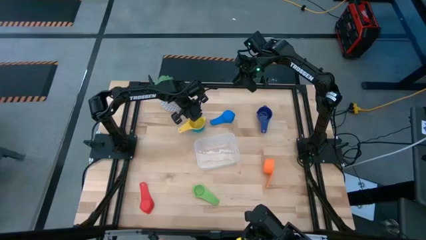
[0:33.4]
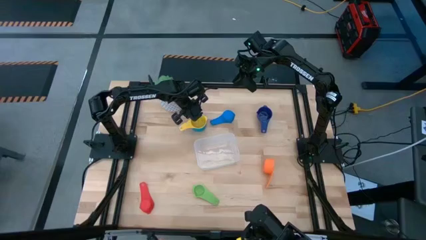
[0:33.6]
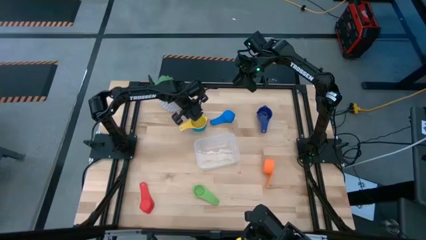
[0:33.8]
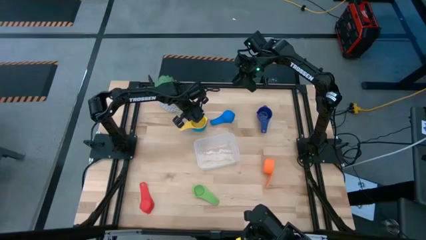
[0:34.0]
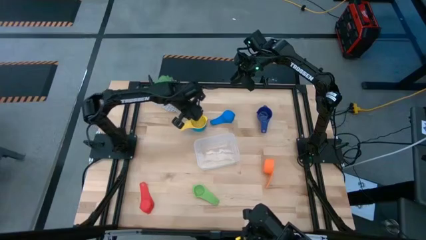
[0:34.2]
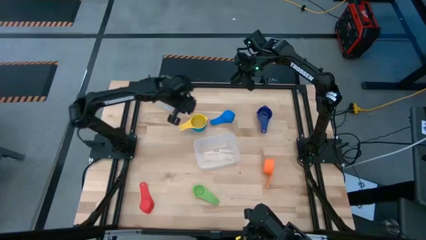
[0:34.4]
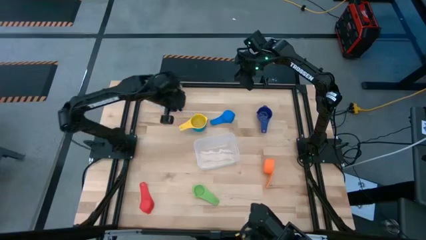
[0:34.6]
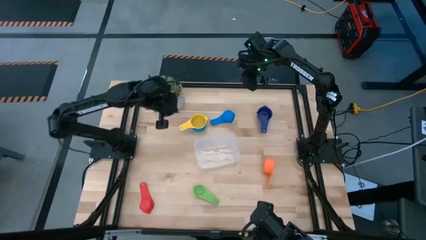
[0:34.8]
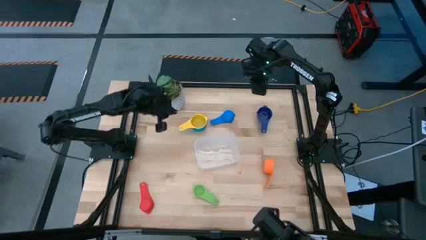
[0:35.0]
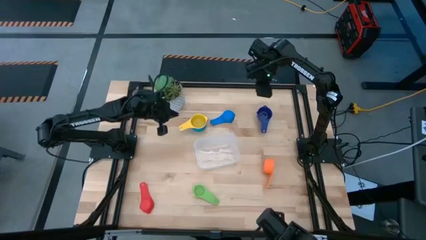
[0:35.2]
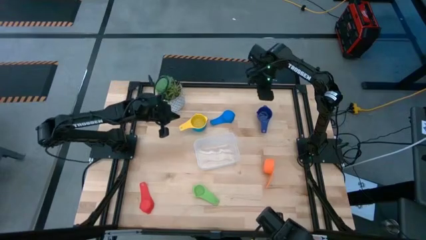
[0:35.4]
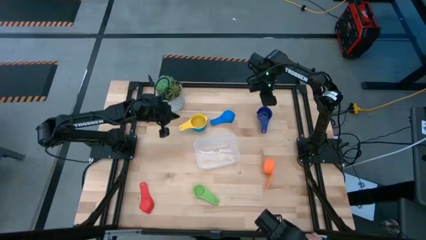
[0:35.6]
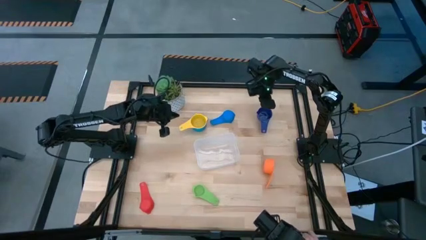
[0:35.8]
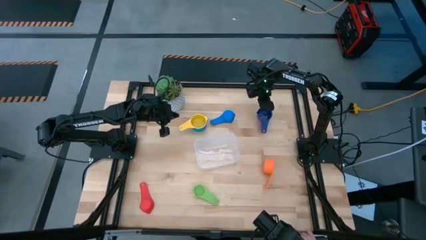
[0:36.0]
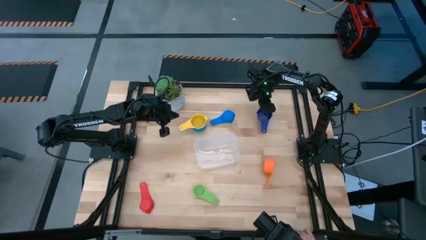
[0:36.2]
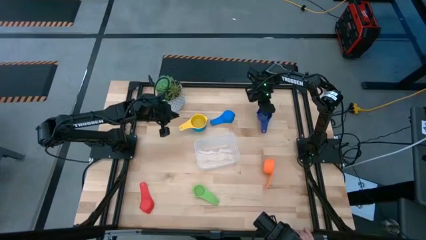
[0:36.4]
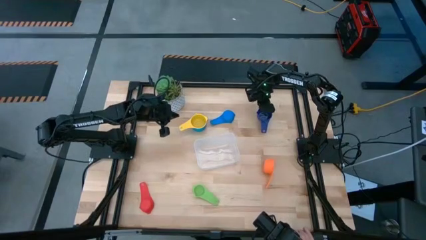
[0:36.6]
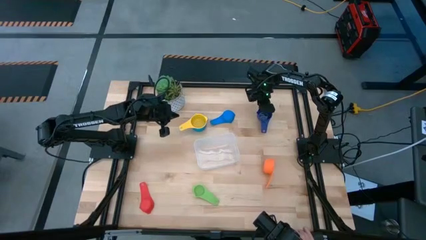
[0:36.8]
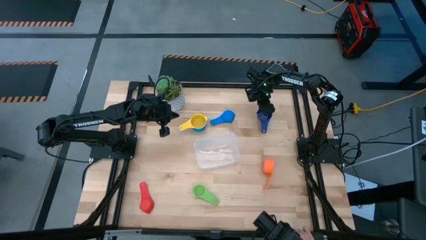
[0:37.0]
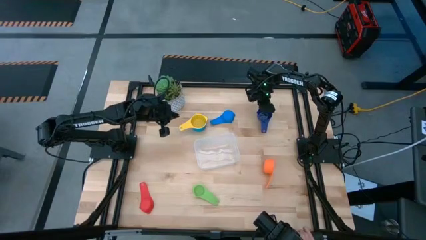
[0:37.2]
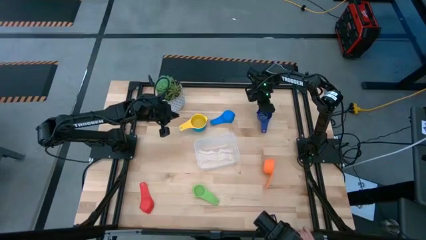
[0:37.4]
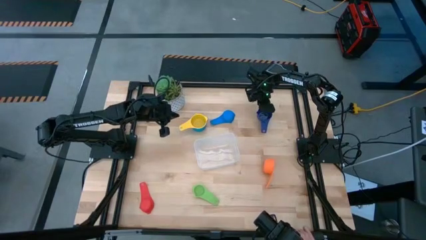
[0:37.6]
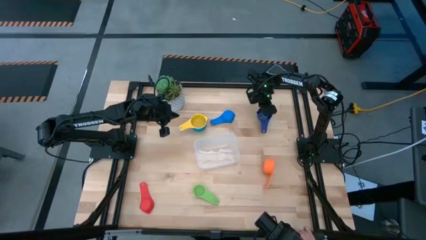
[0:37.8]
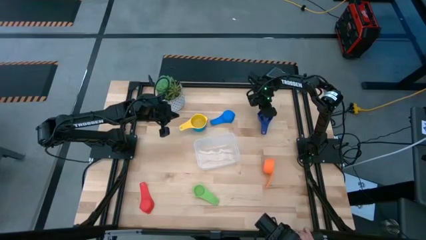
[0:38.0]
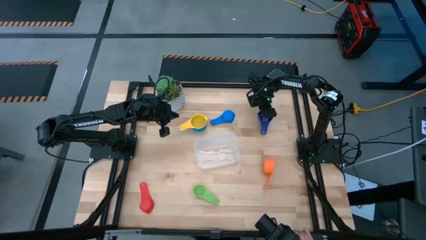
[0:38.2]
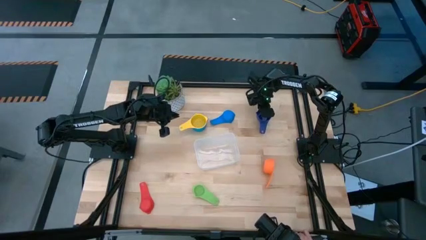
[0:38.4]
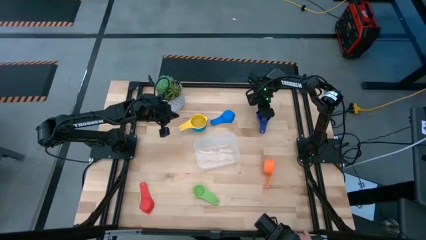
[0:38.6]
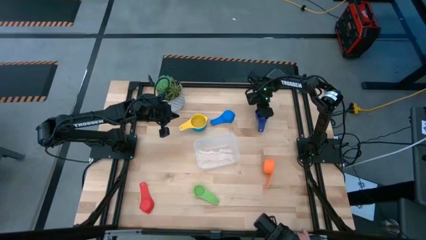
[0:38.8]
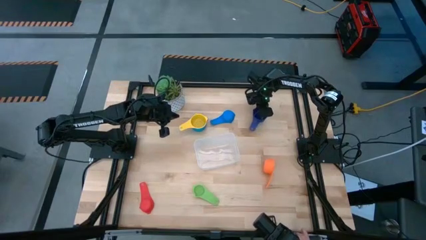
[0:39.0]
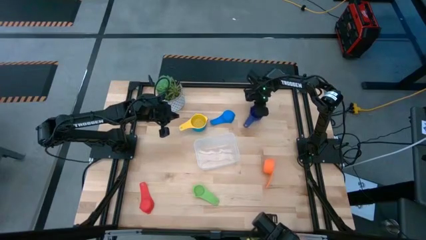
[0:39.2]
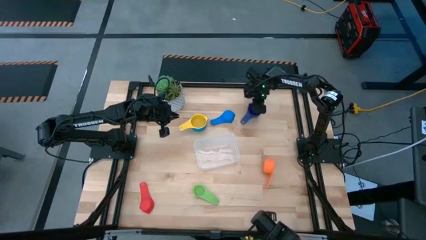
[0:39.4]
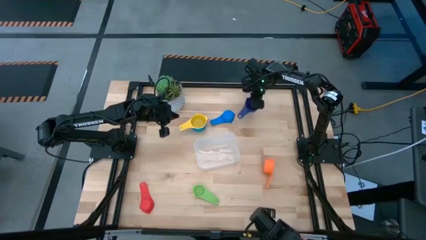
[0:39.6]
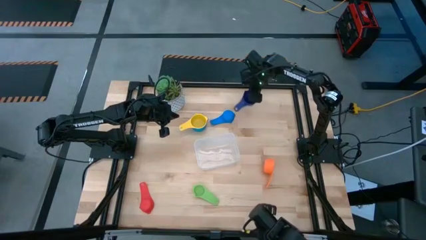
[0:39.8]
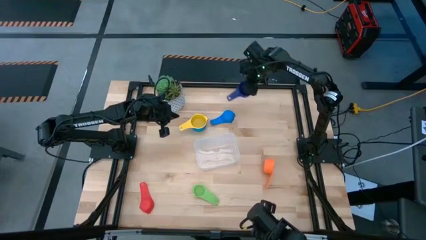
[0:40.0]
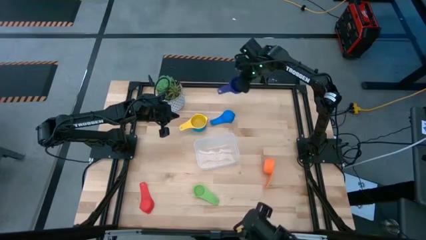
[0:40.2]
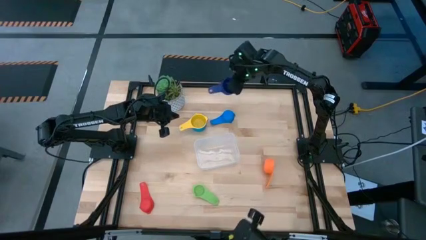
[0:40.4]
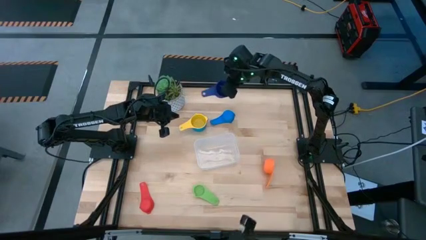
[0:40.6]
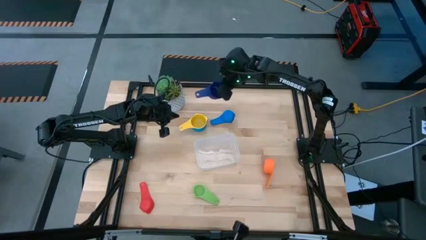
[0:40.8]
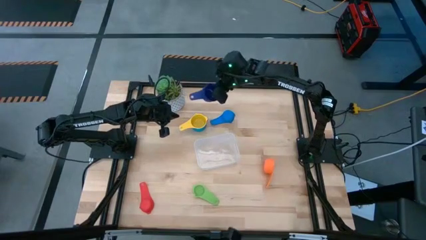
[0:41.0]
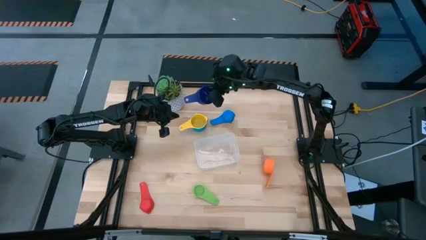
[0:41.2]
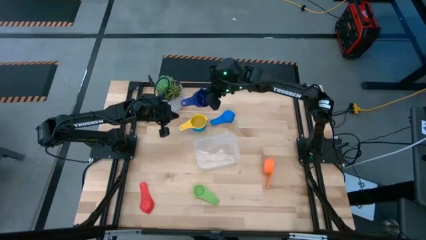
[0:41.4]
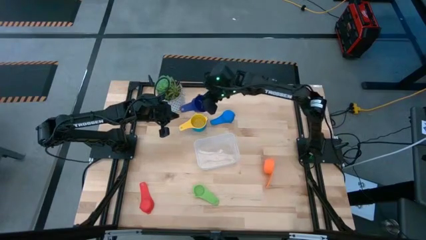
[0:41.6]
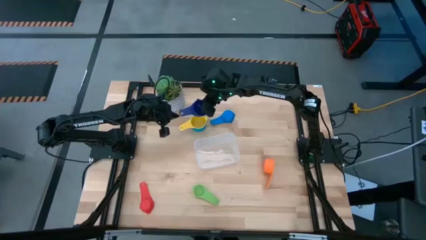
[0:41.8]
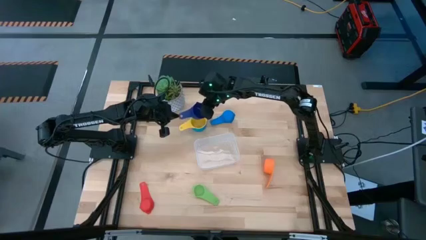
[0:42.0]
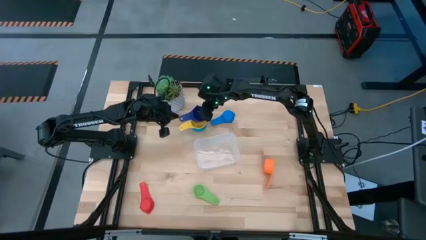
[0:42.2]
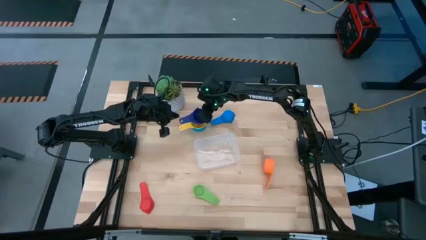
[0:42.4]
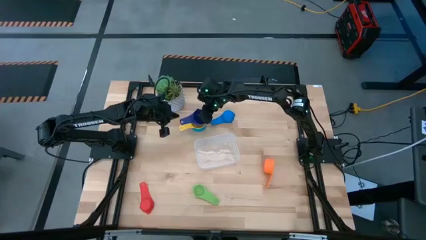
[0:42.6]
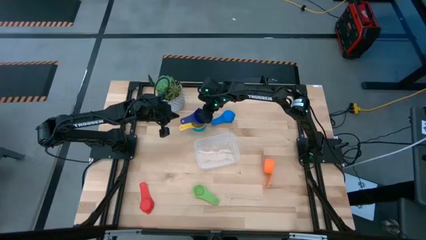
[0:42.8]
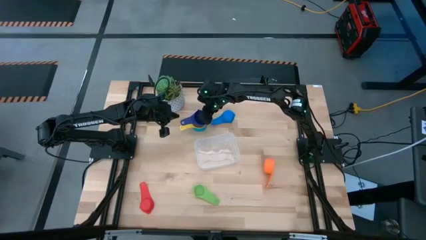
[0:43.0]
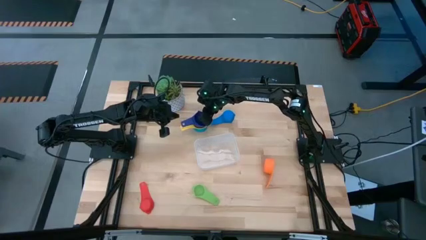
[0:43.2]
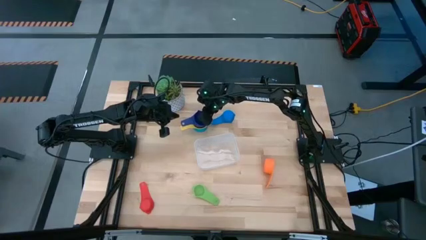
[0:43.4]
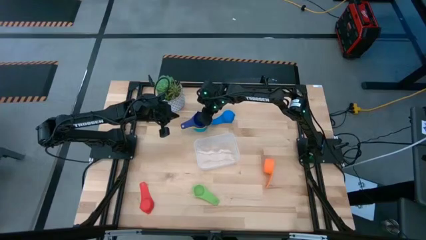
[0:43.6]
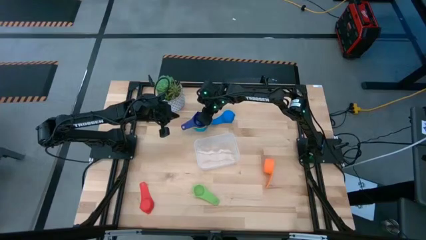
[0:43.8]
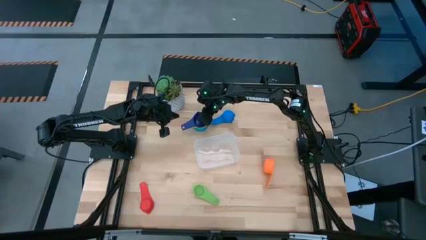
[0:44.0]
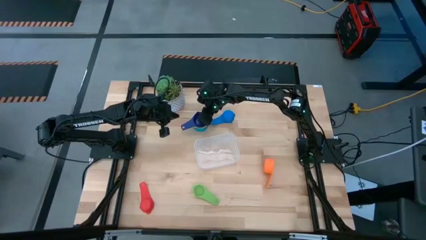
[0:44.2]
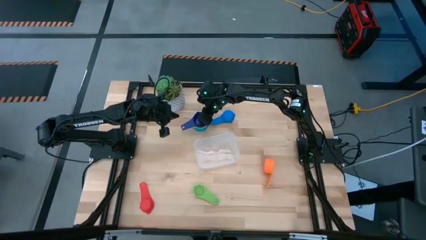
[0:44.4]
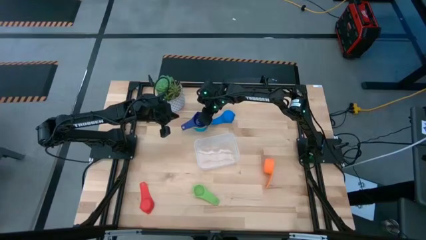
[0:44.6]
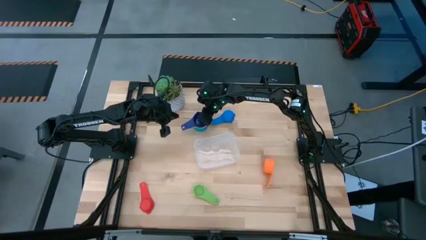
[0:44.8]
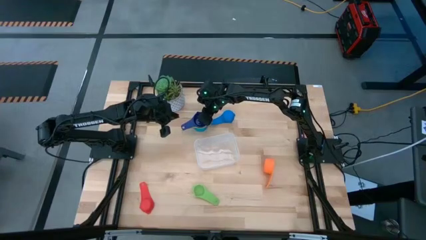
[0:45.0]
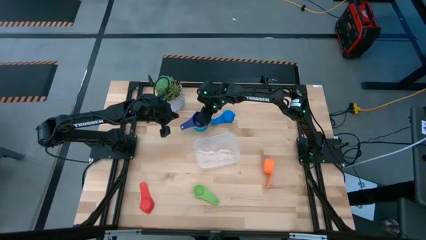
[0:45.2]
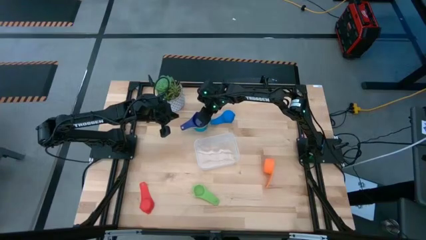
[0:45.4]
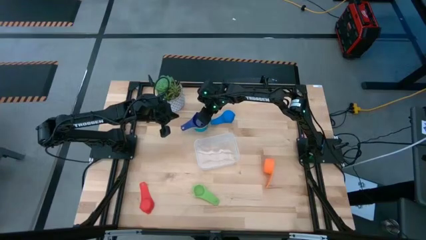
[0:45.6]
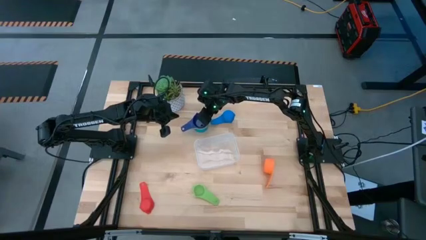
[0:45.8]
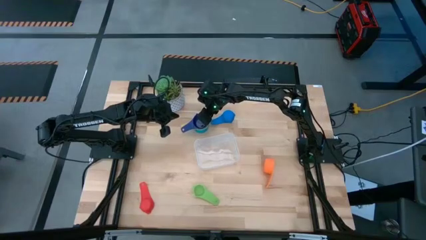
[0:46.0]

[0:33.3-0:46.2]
Task: Nest measuring cups in basket
Stack the dark blue measuring cup on top of the yellow measuring cup

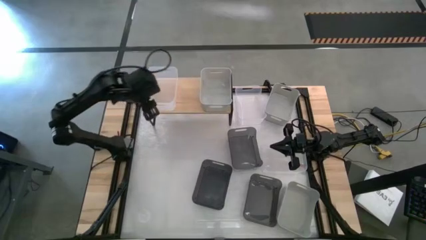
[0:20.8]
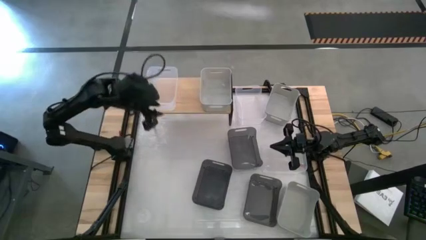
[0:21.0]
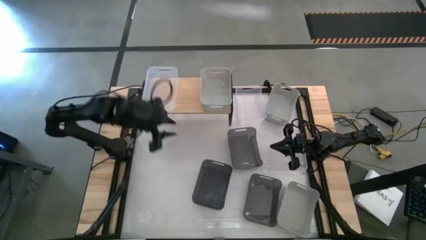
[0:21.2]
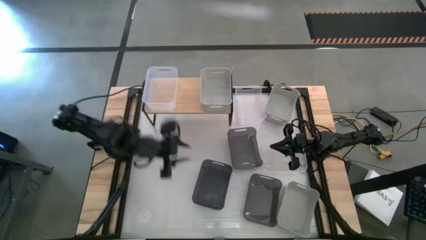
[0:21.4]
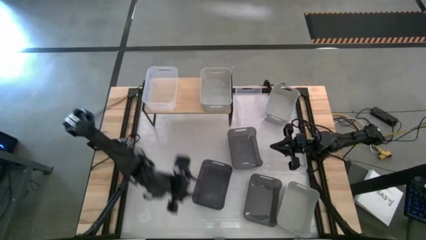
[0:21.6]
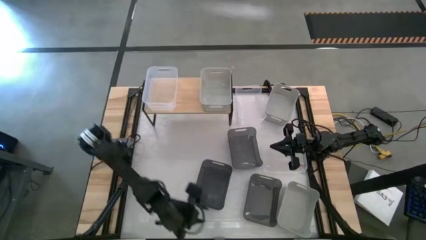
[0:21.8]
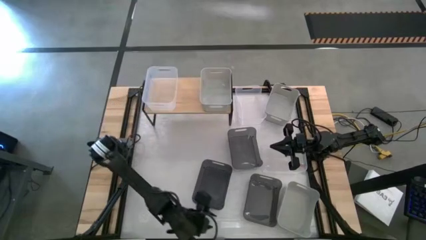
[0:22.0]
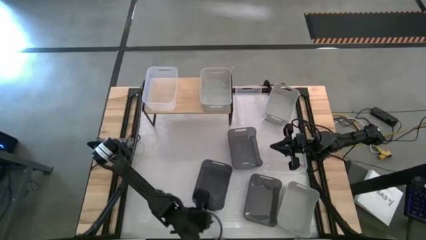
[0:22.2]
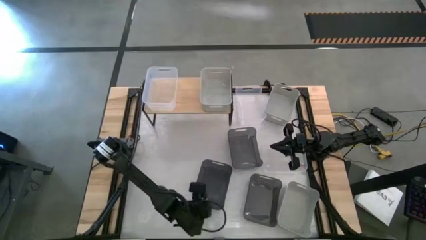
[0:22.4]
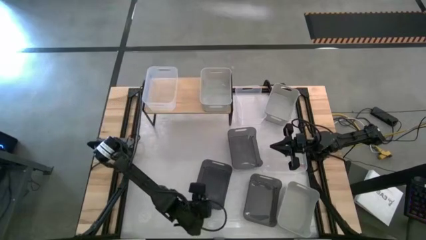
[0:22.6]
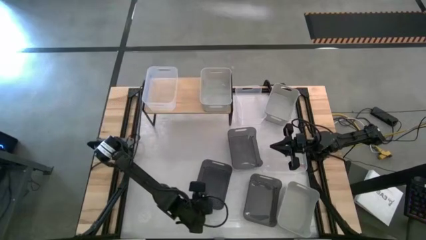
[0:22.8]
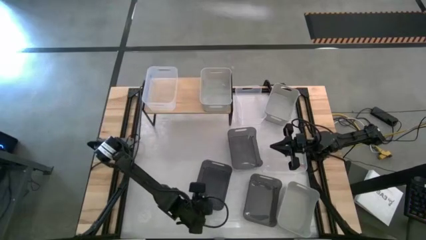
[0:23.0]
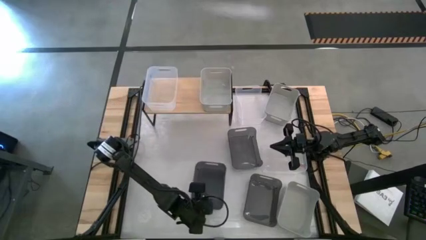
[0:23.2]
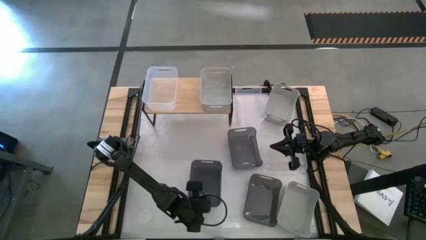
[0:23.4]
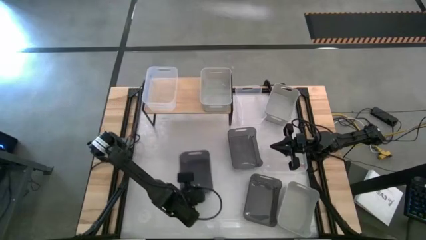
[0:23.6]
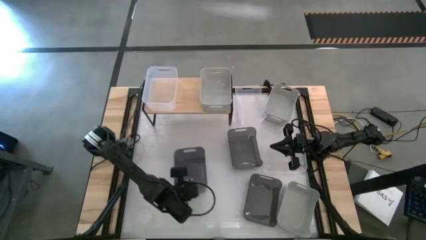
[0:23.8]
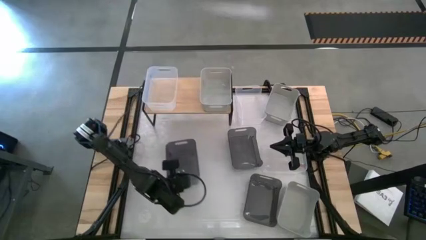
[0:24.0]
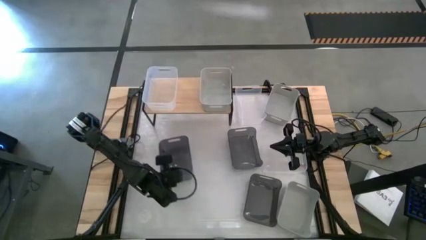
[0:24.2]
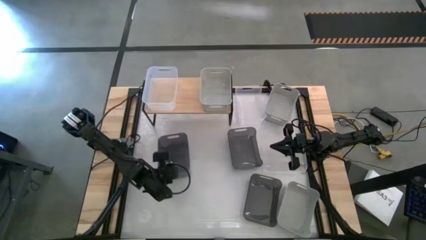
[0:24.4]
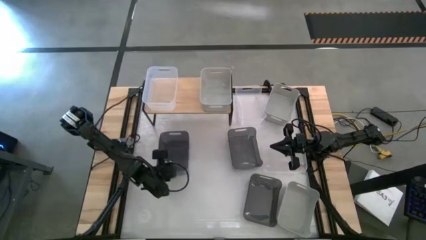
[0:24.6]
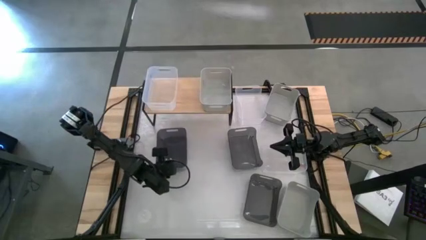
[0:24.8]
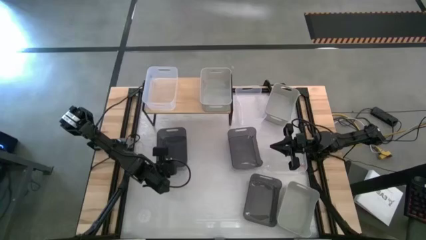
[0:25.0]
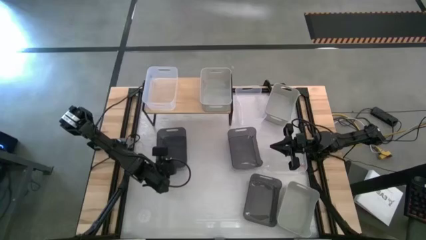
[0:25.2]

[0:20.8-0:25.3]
Task: Stack baskets on shelf by color
Move the black bin to the left of the table
